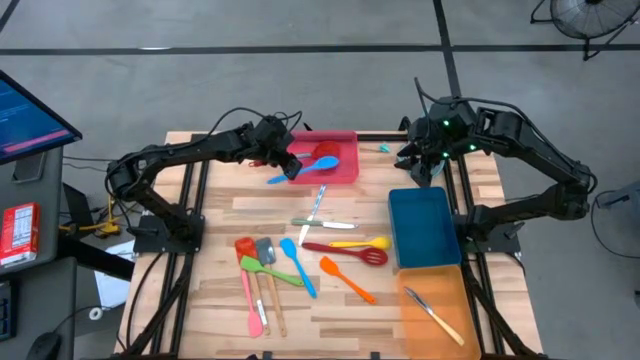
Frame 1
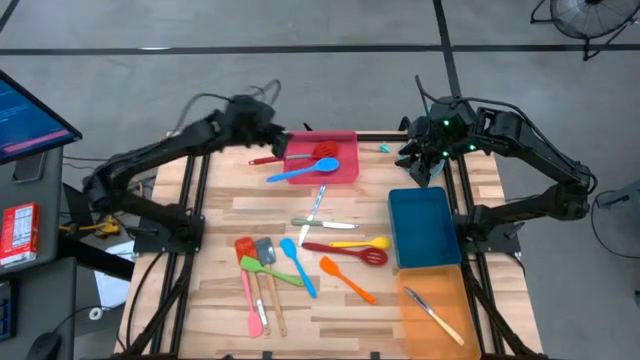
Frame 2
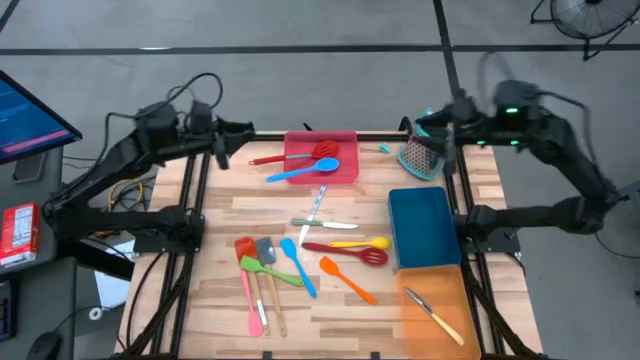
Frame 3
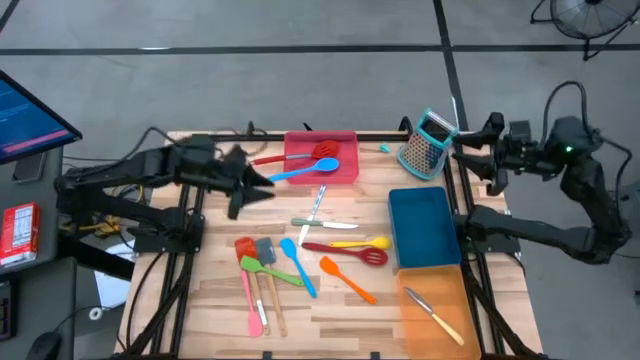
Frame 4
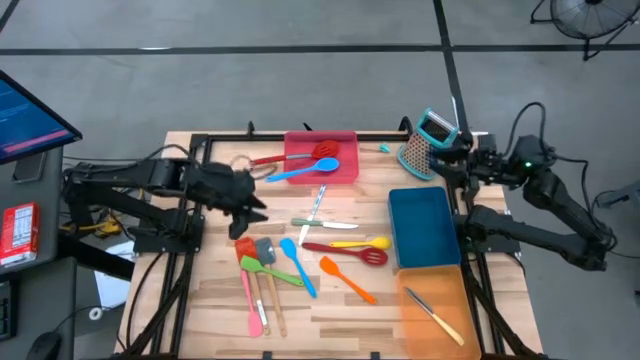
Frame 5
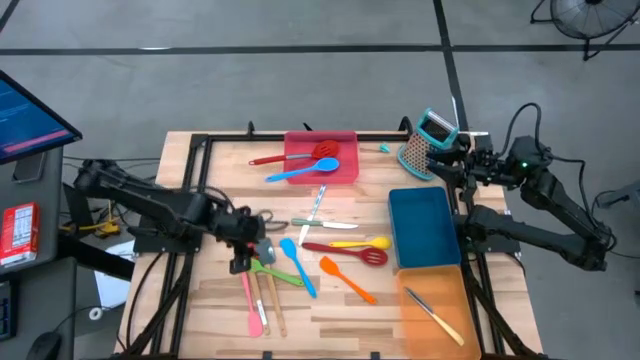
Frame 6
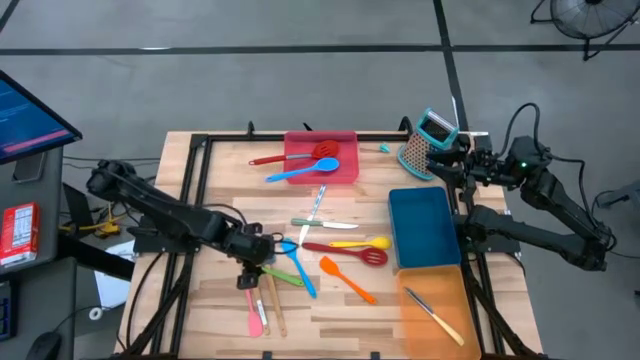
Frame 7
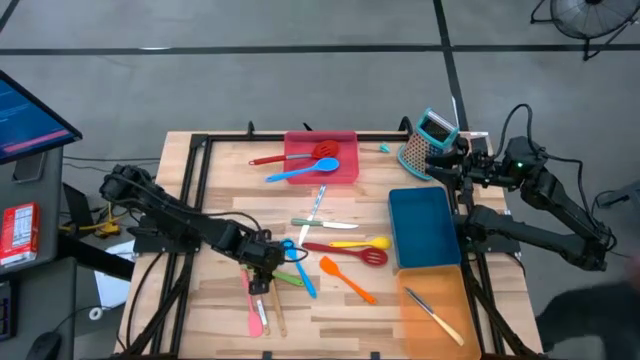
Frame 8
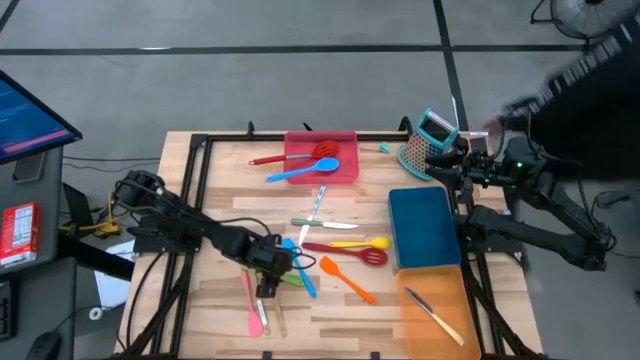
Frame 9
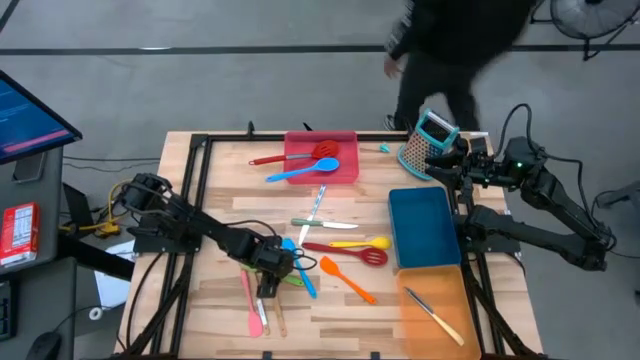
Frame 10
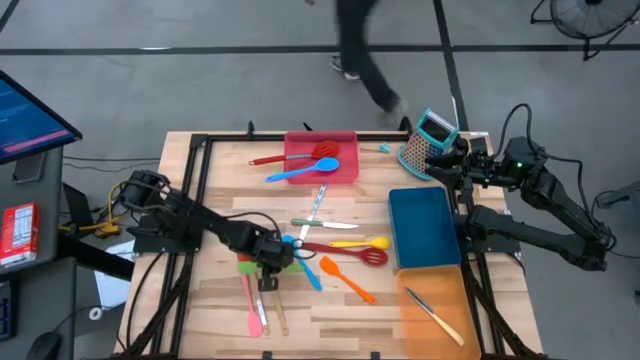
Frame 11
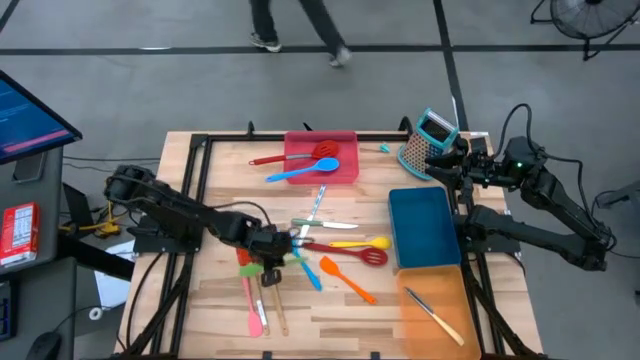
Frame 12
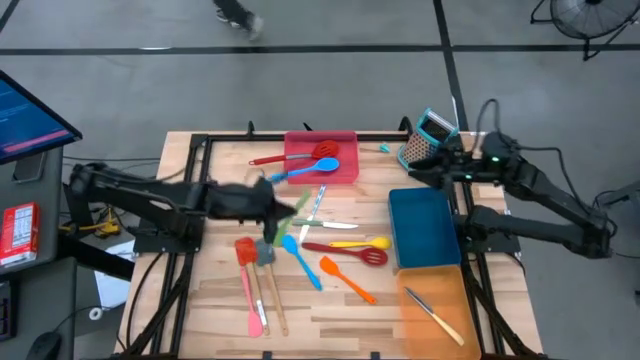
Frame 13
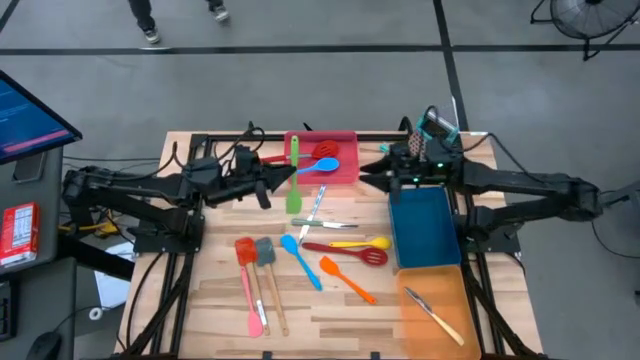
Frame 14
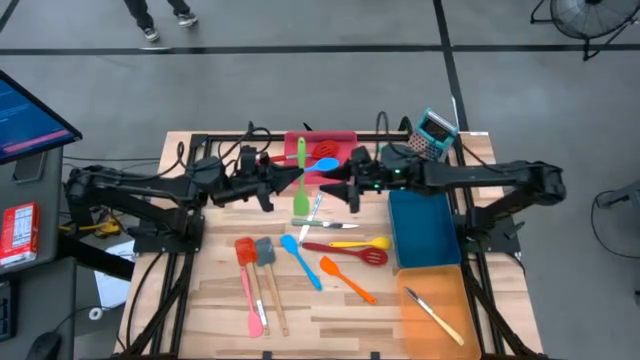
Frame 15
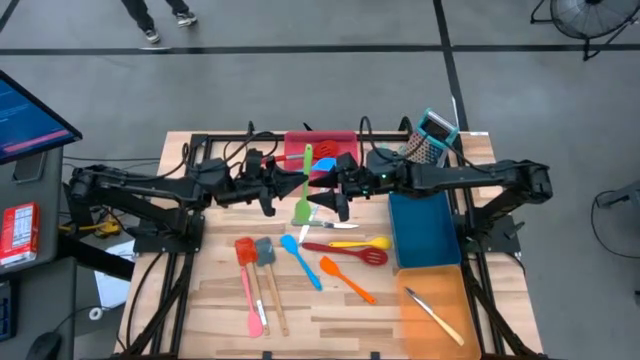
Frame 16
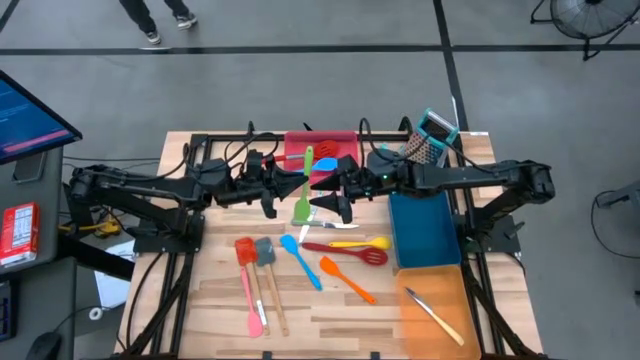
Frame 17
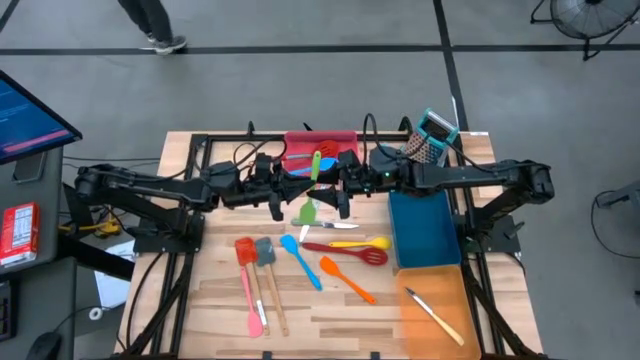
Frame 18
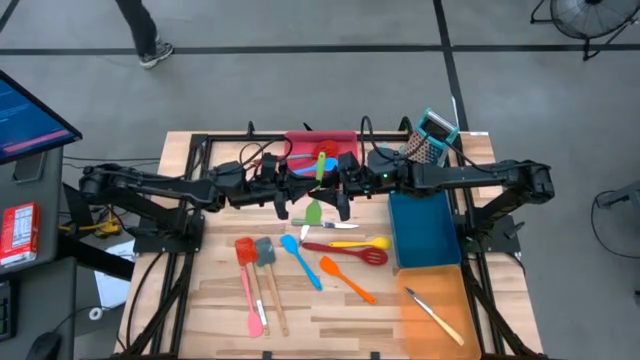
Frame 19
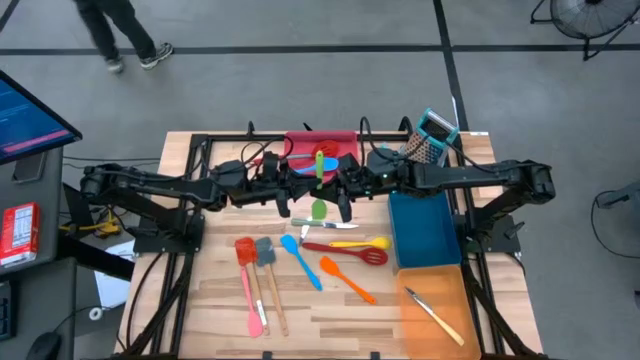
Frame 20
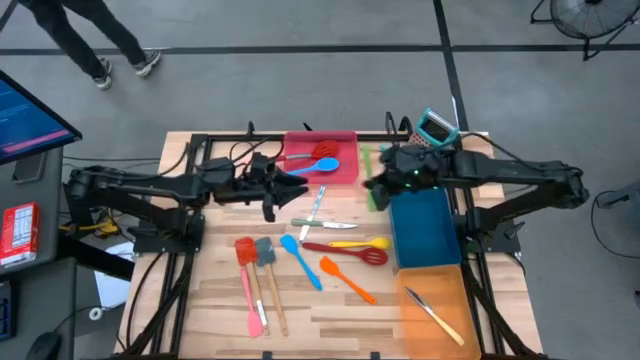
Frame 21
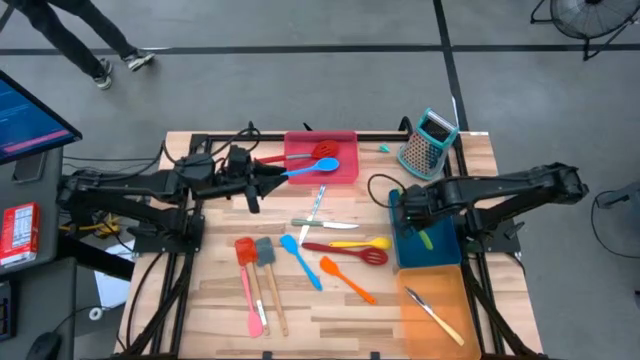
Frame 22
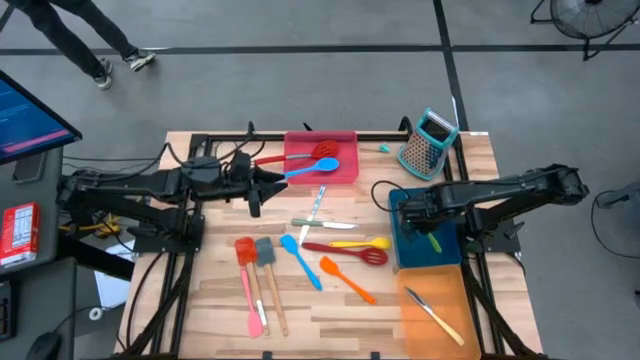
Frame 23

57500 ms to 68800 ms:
Task: Pick & Place Kitchen Items
Put the green spatula into the blue bin
